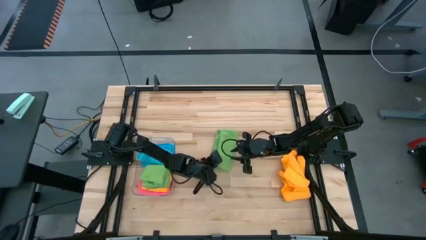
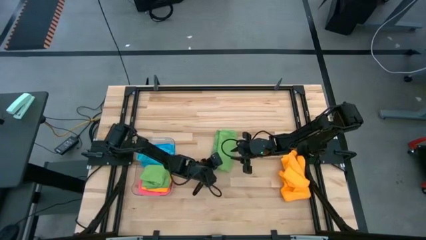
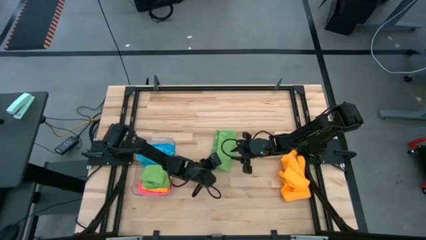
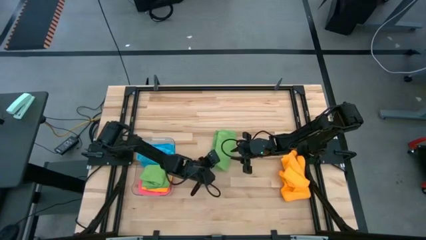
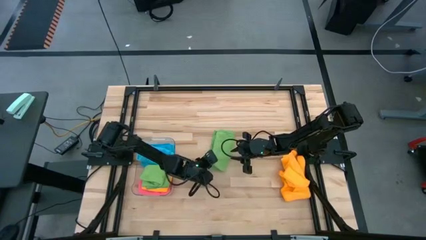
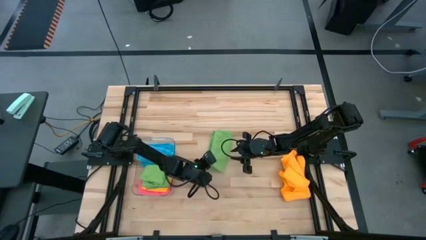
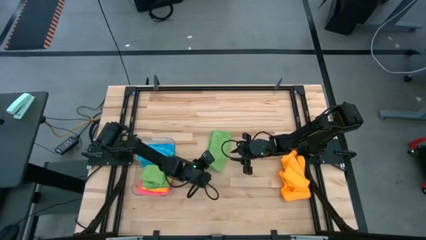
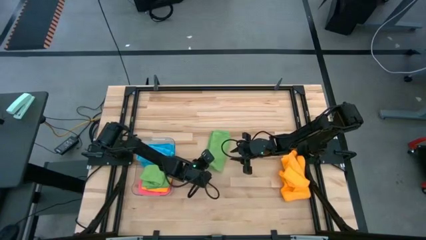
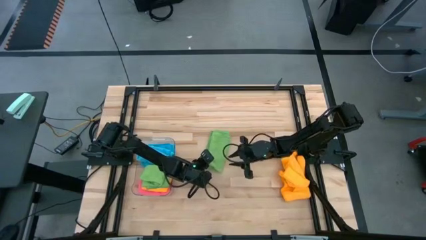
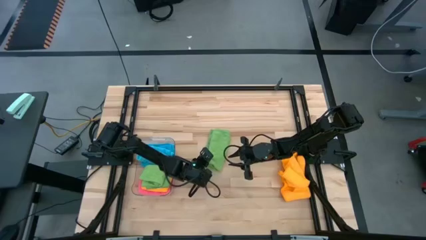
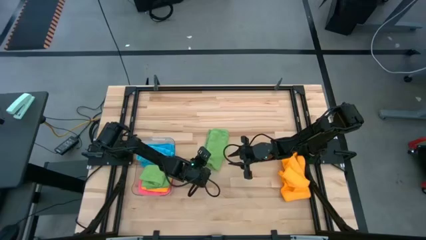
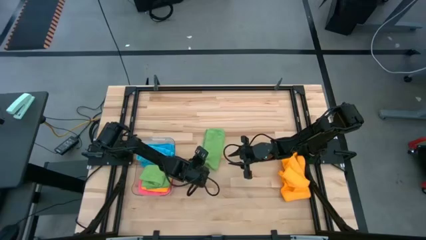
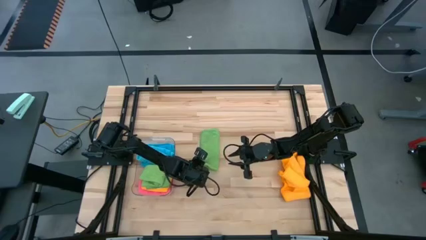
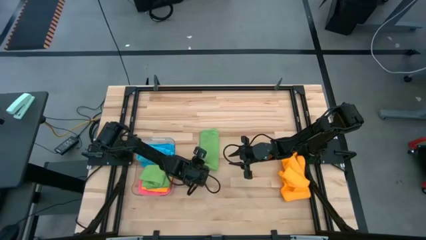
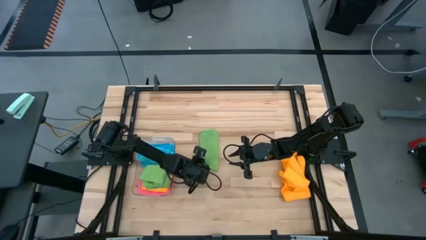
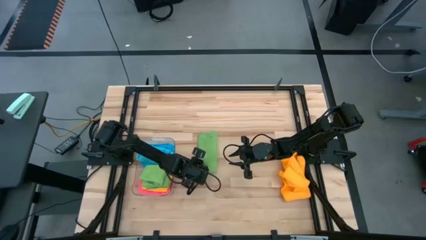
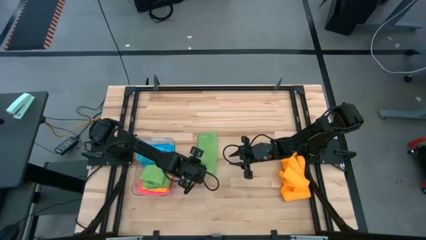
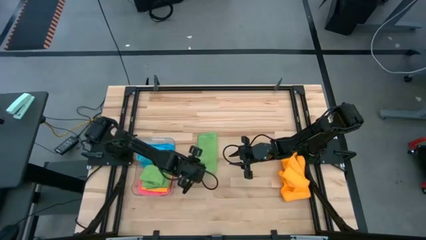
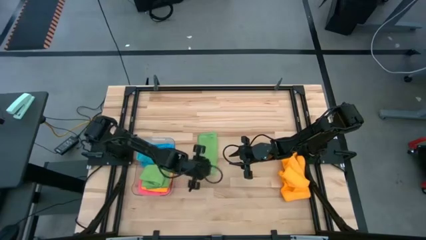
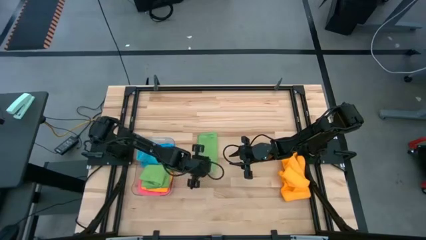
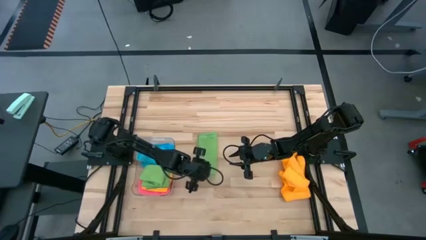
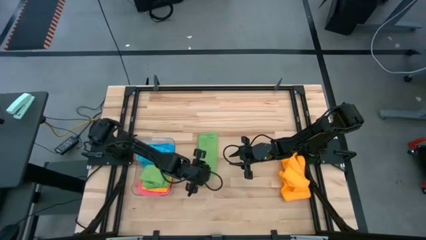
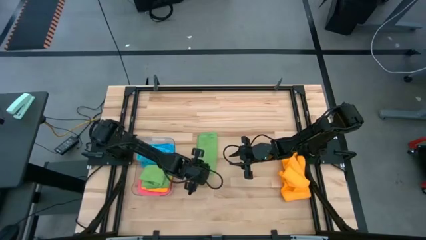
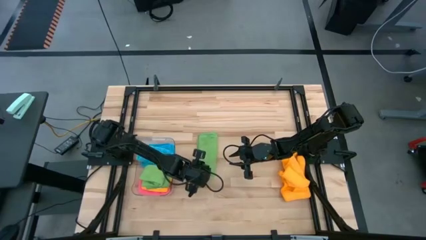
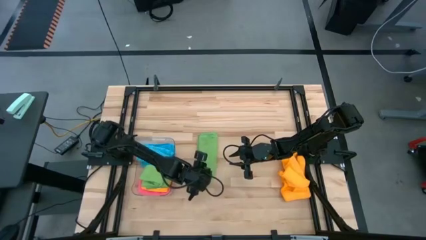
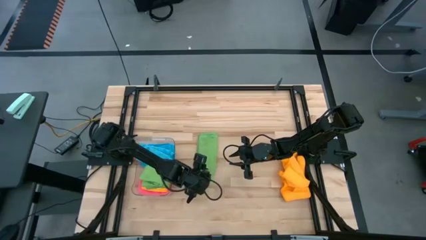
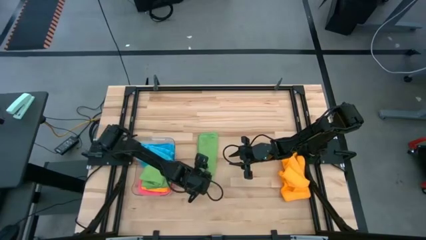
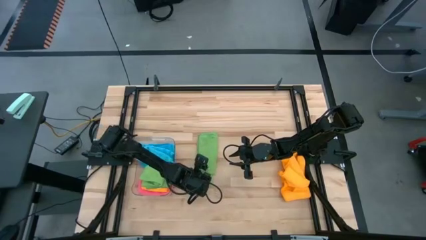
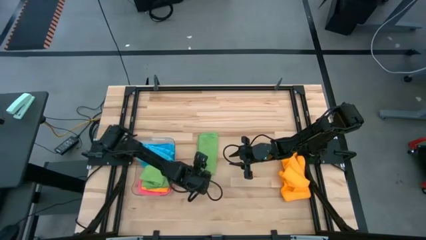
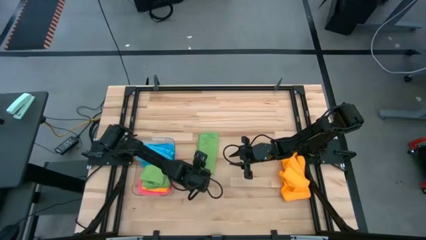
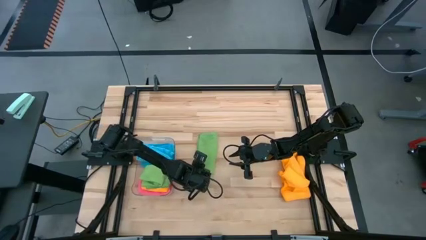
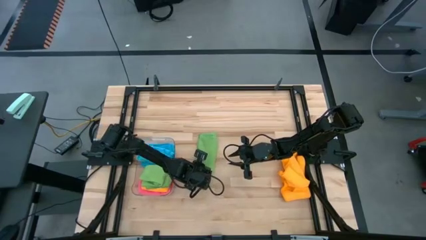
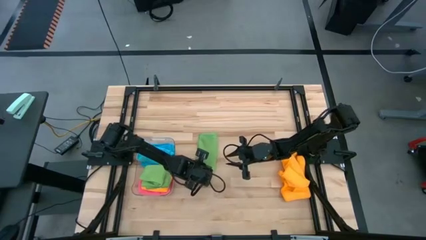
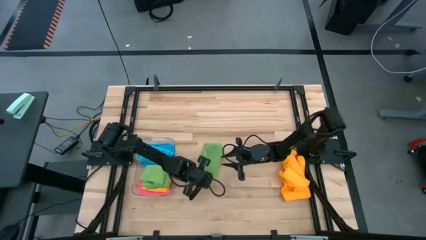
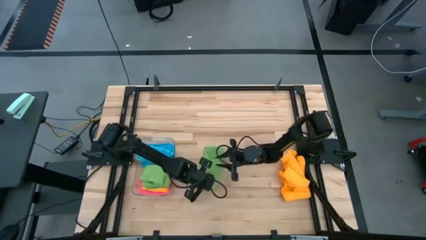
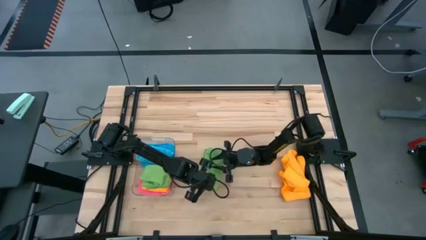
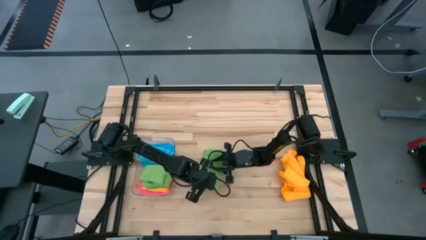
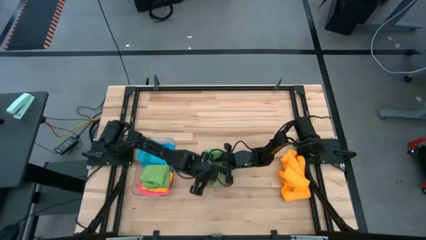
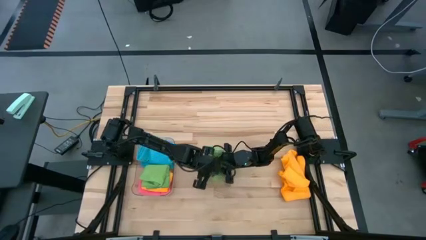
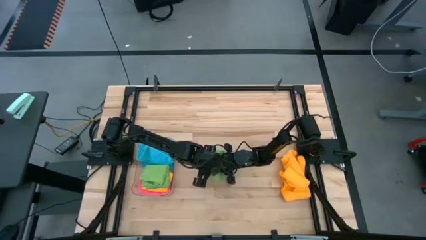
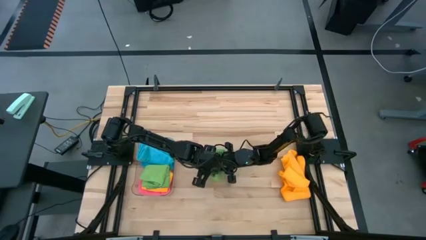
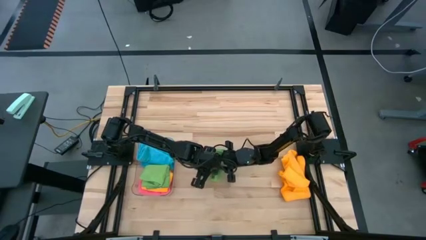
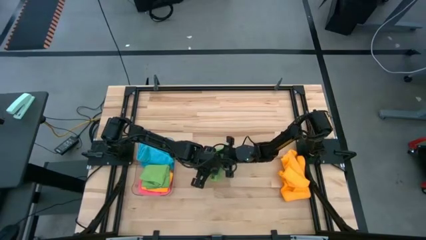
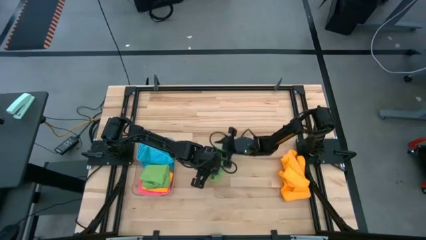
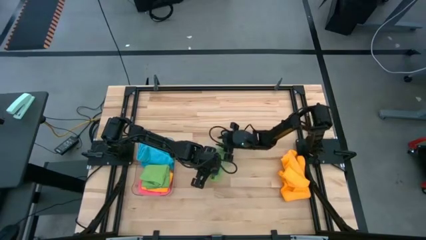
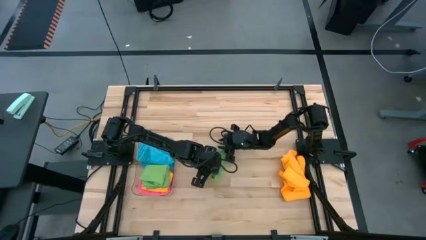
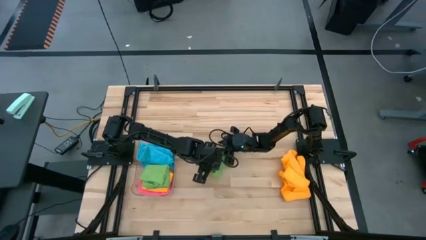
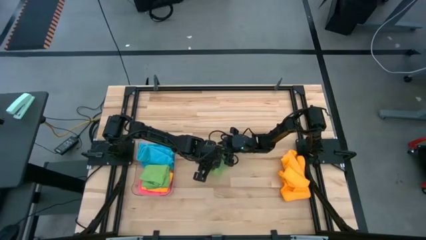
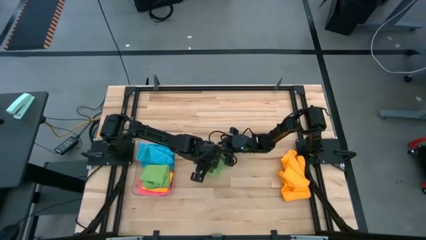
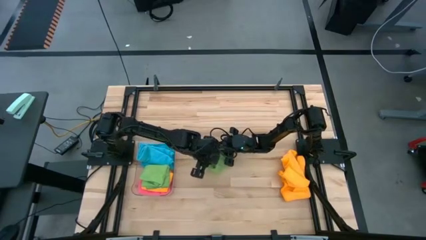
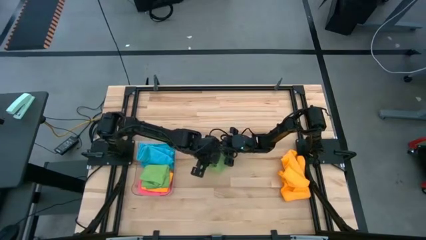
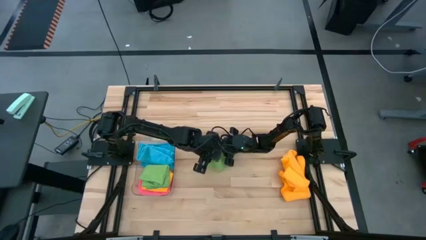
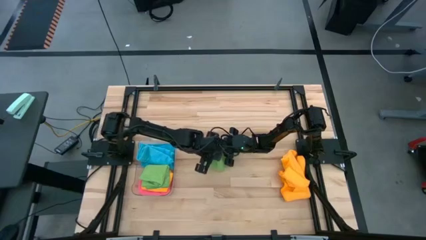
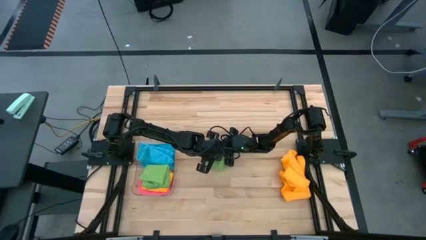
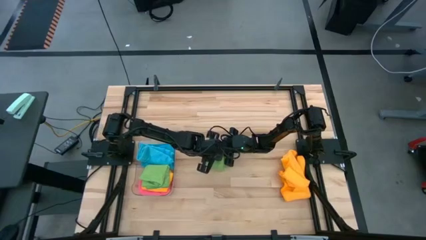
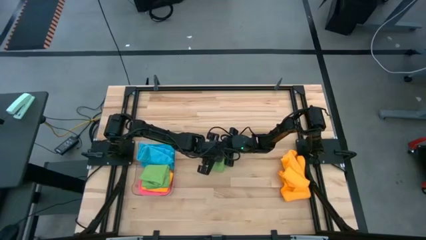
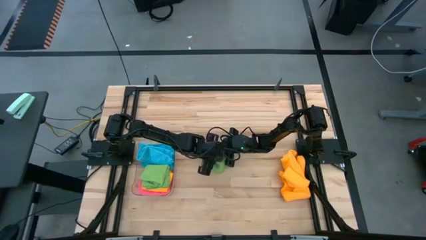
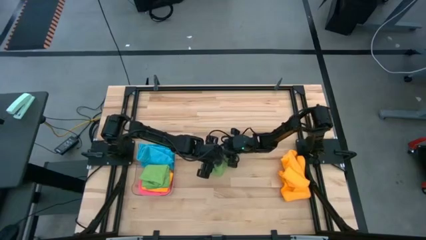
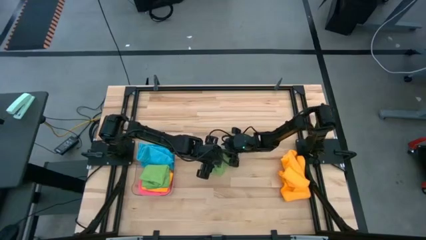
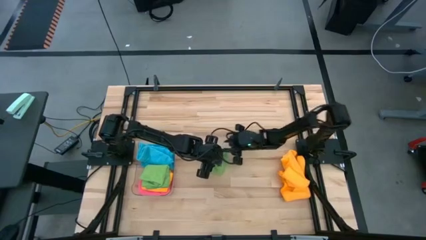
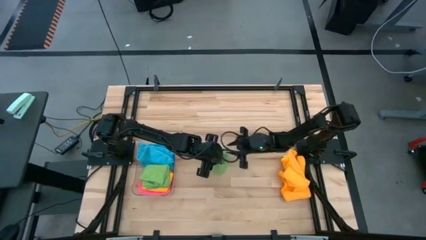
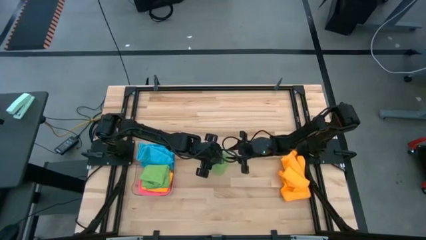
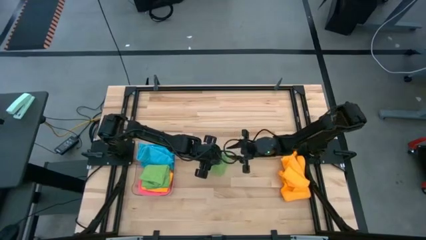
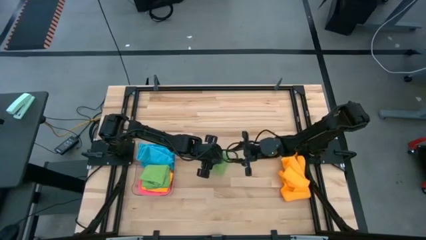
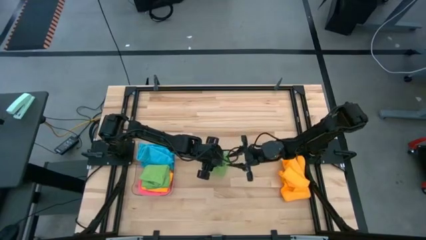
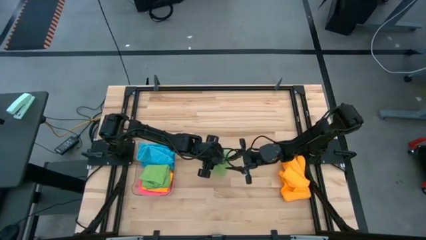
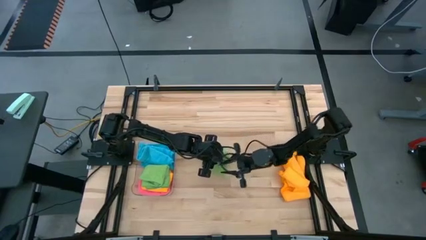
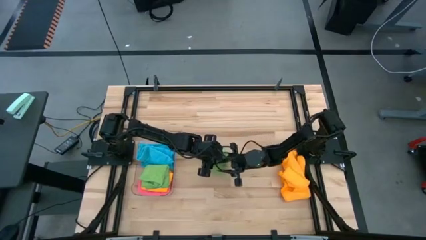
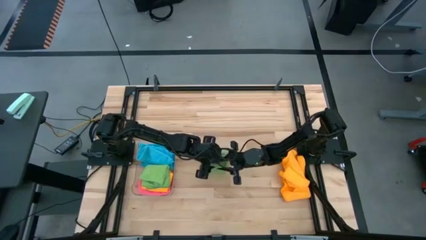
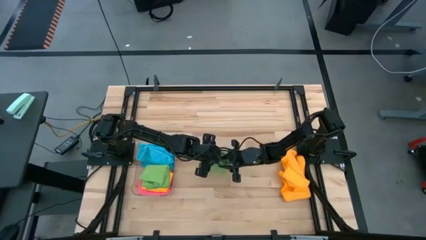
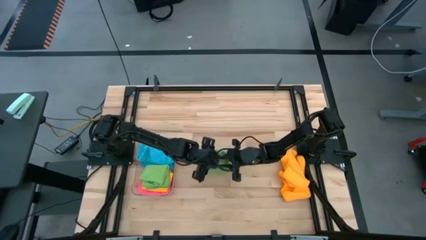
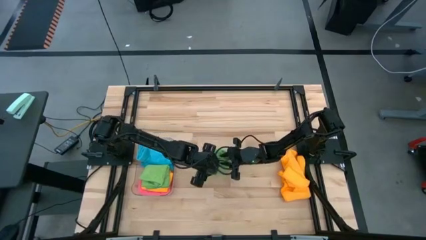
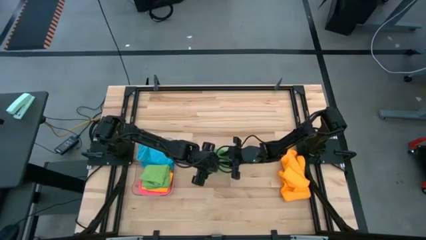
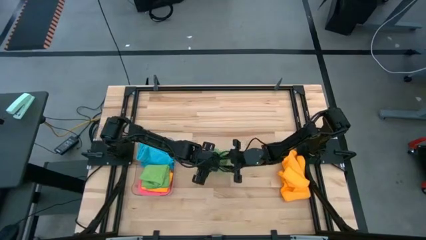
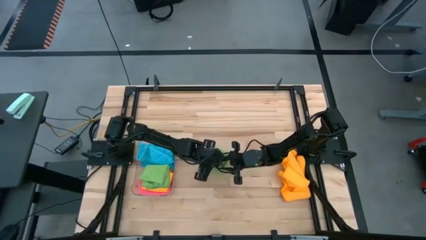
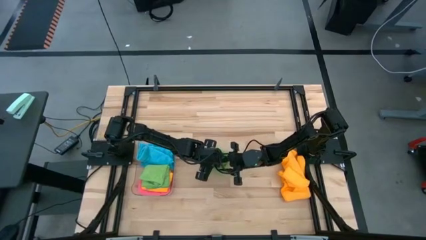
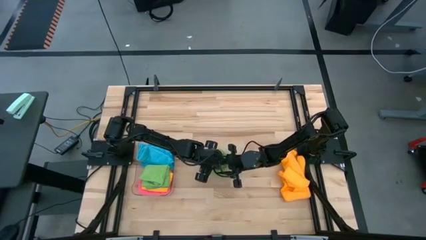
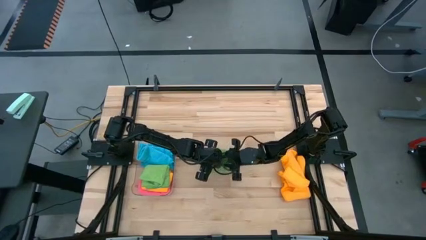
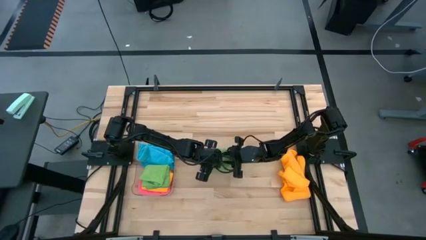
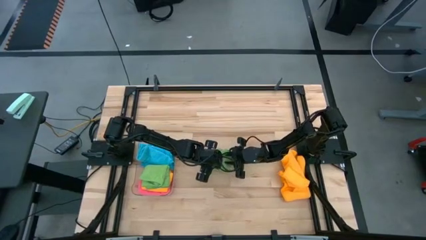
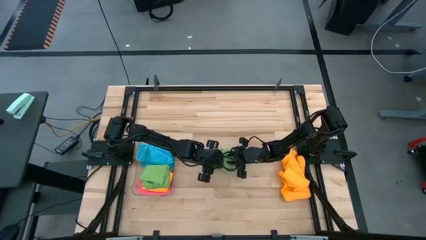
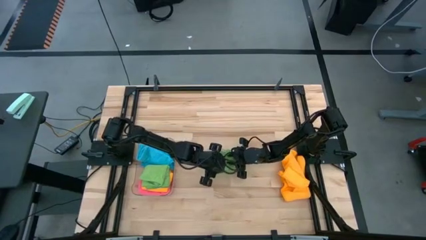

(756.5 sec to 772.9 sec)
Task: Fold microfiber towels
Fold the green microfiber cloth
